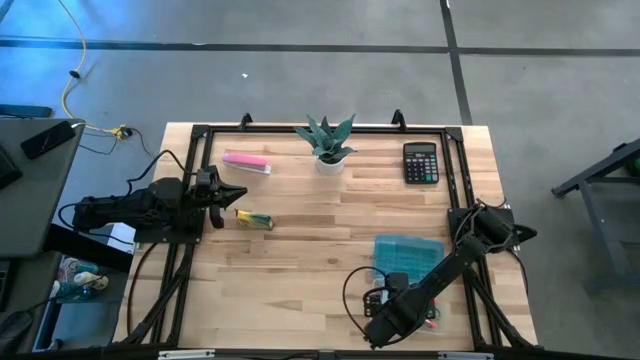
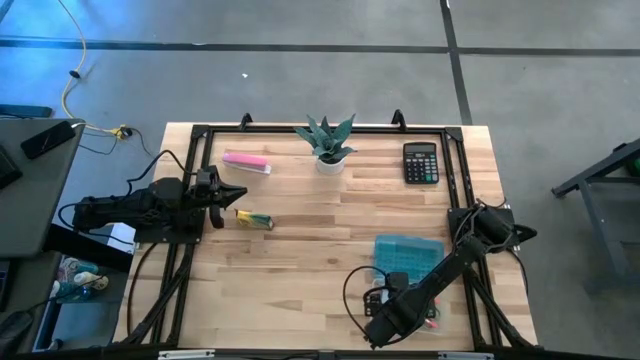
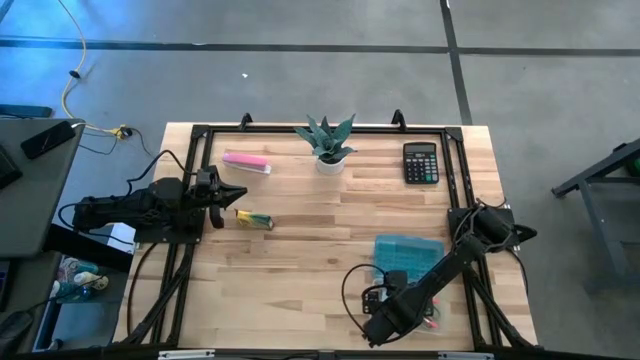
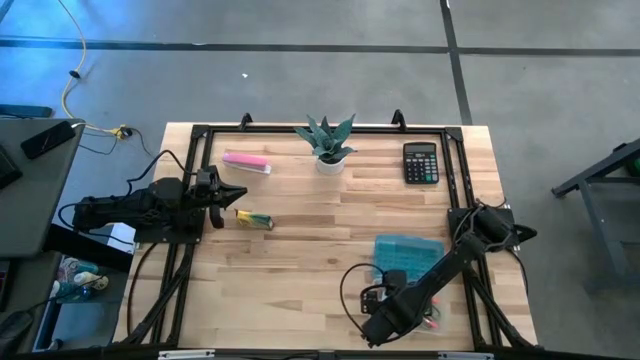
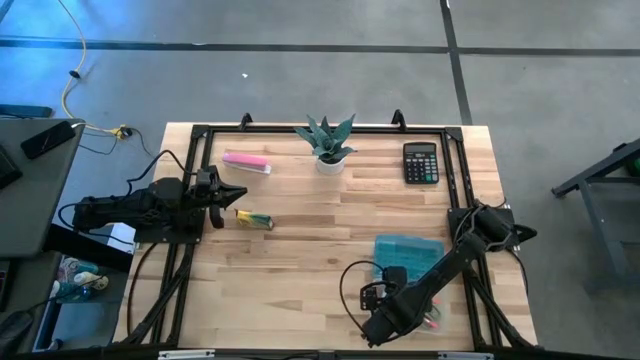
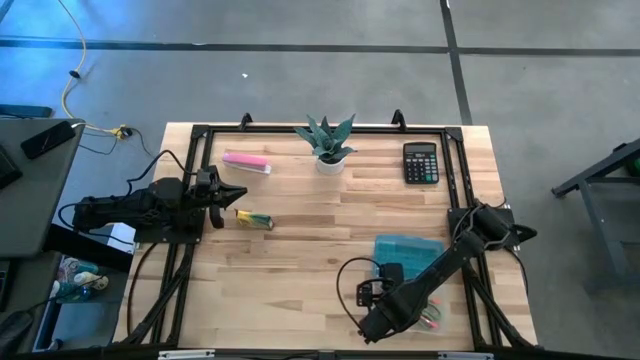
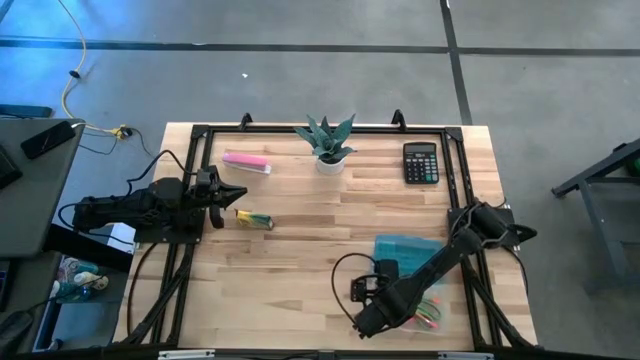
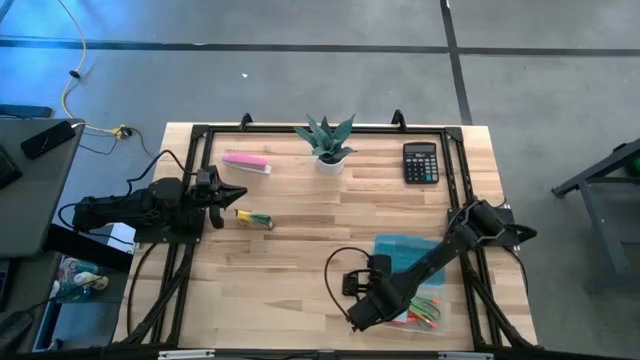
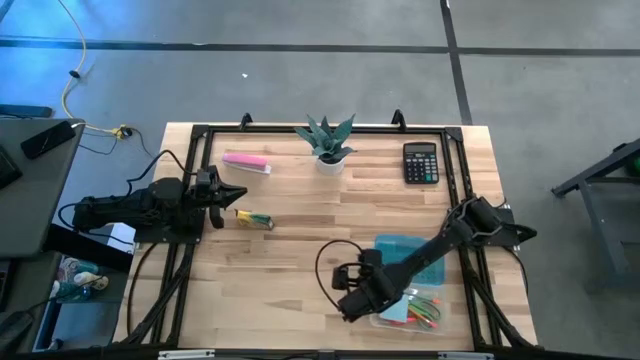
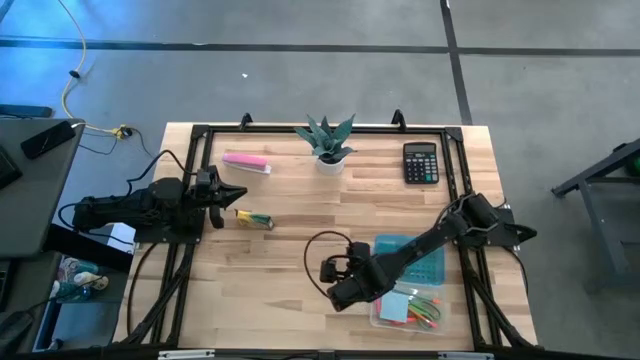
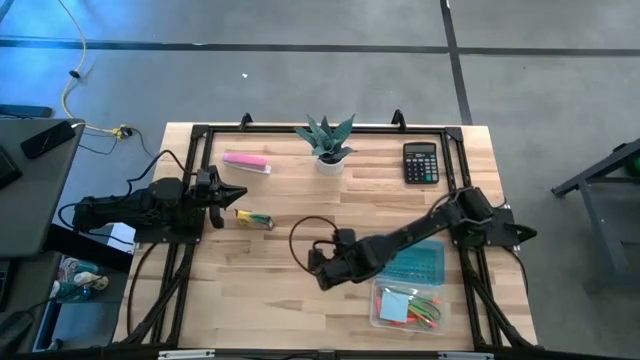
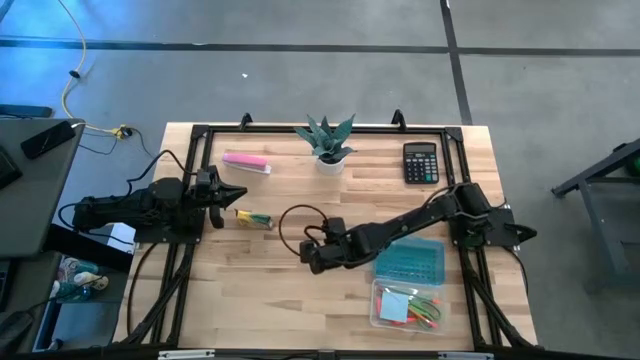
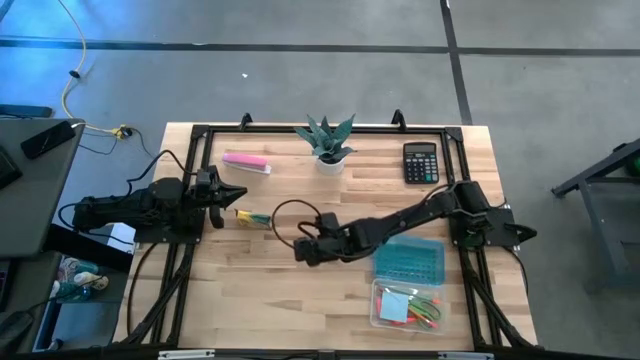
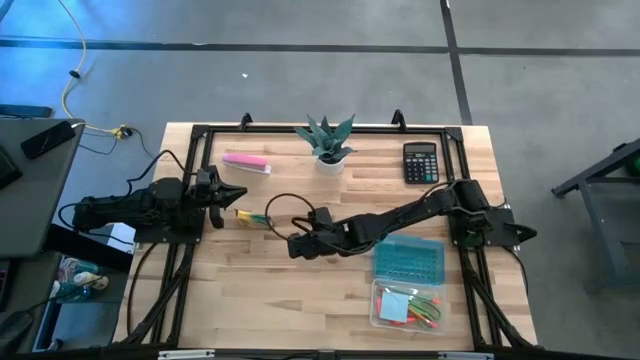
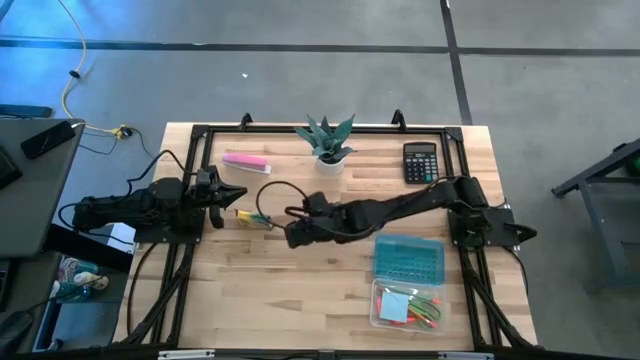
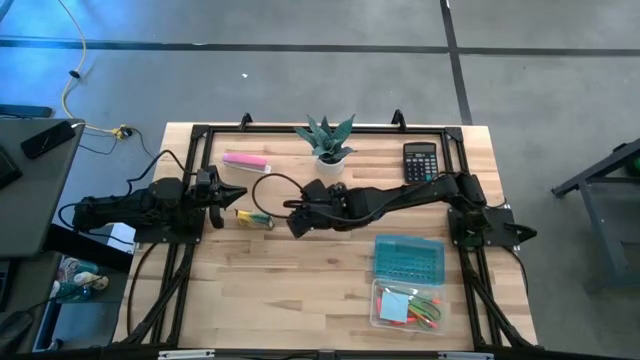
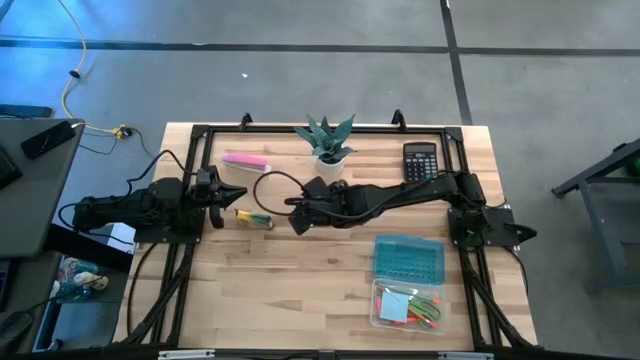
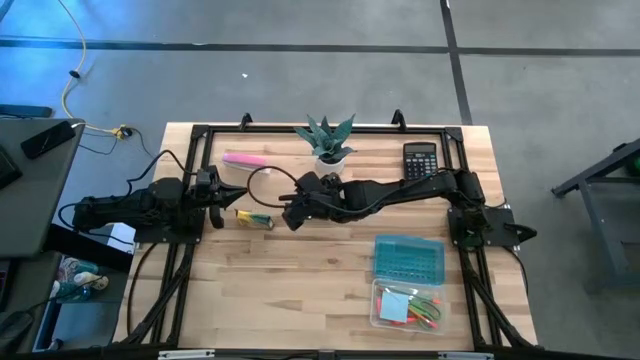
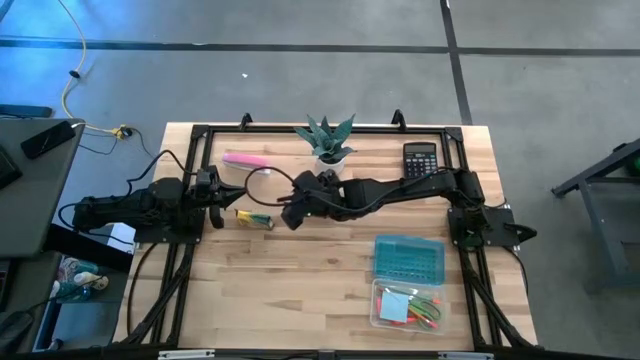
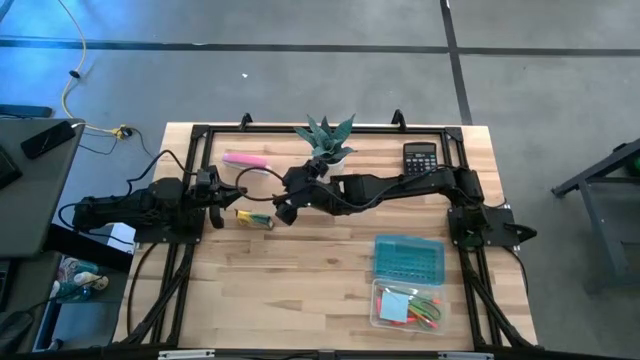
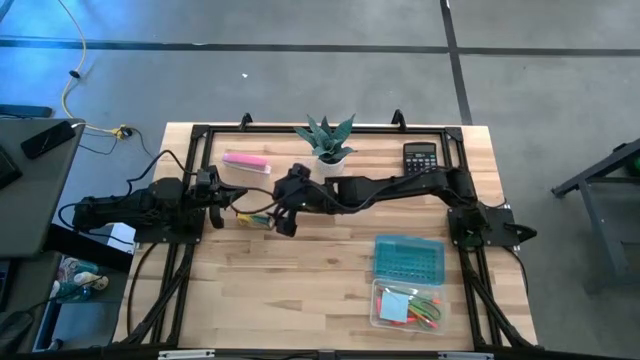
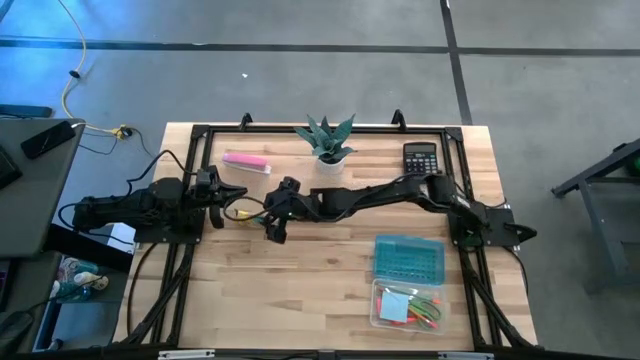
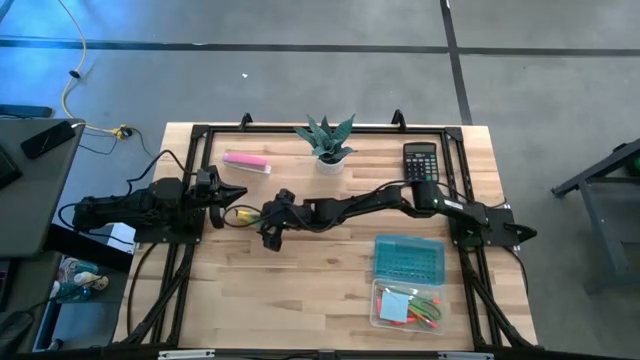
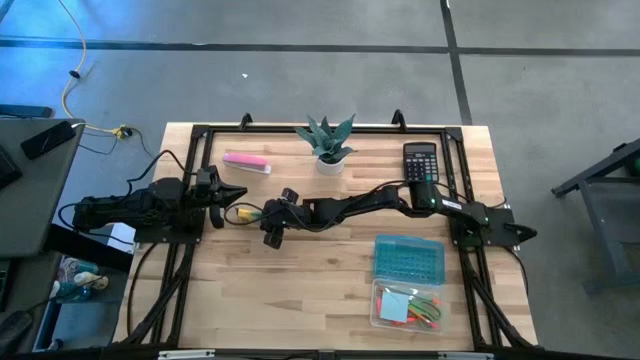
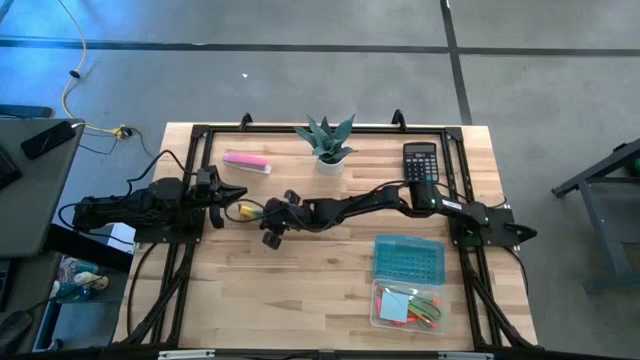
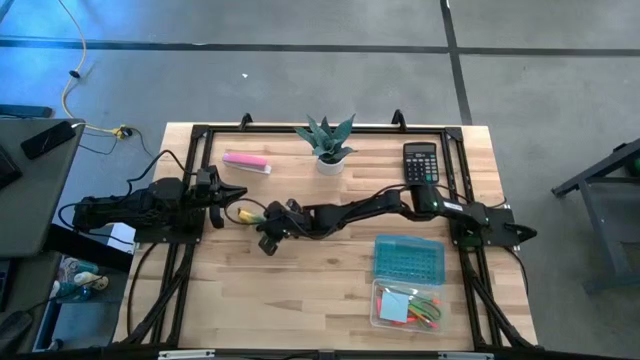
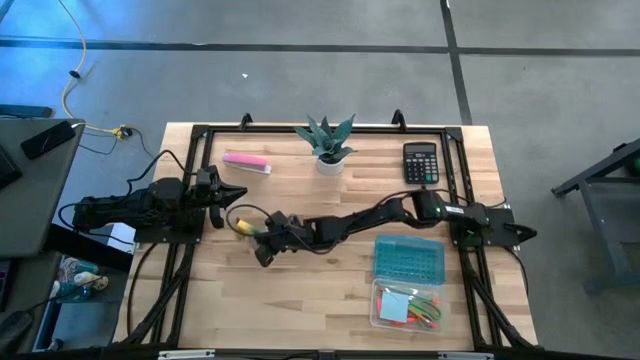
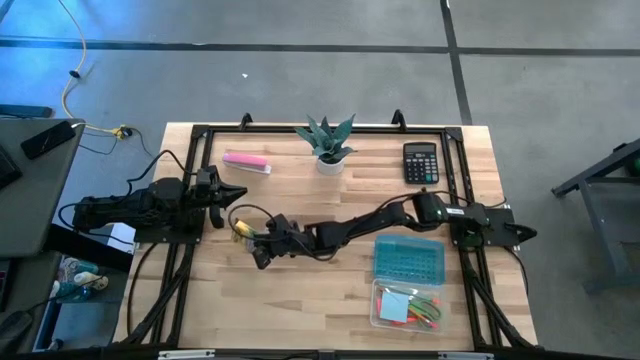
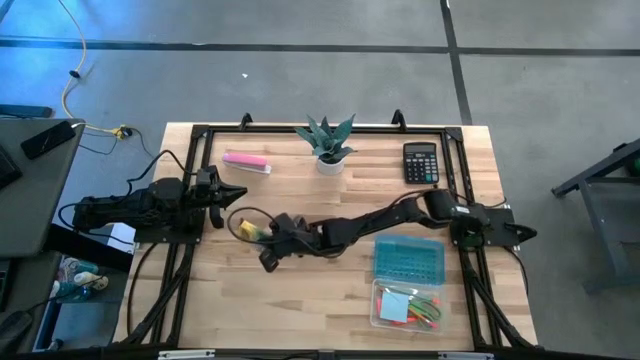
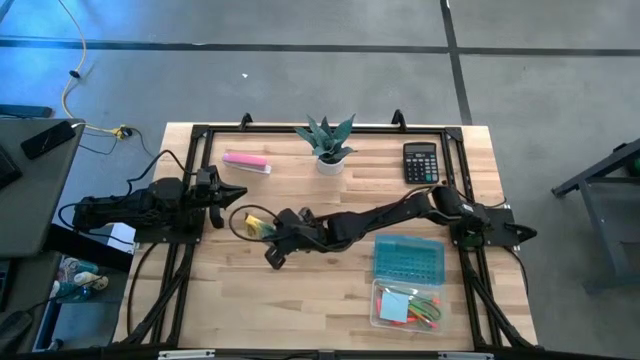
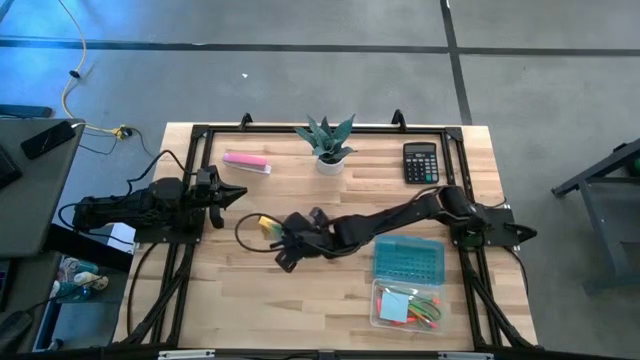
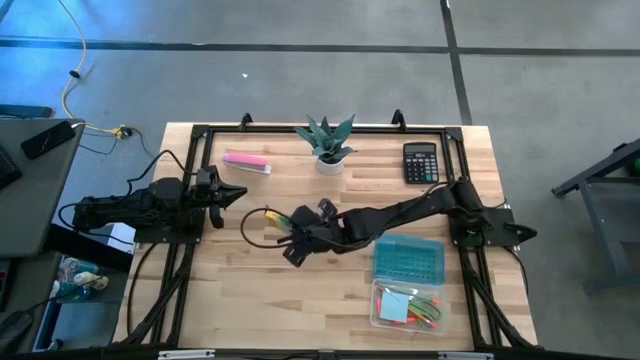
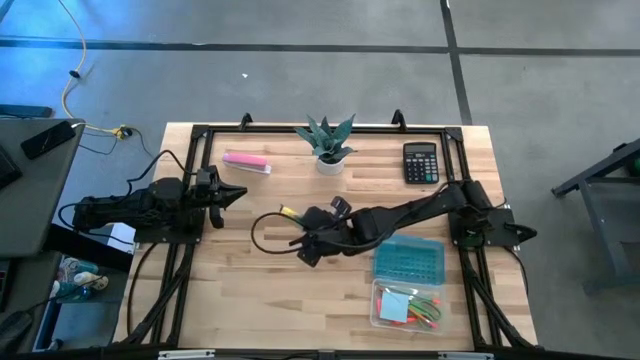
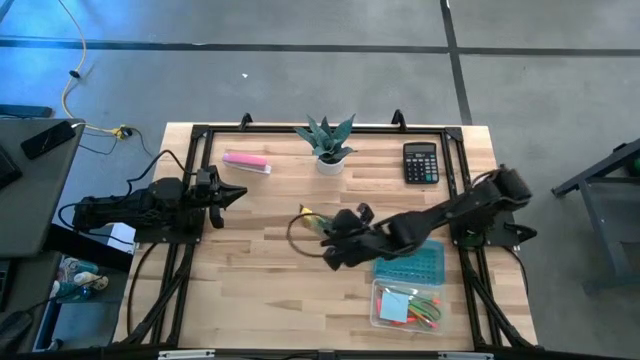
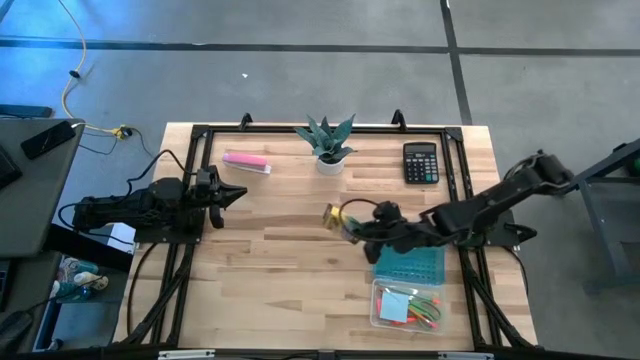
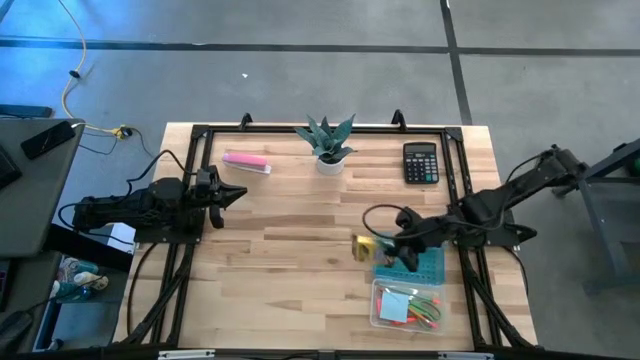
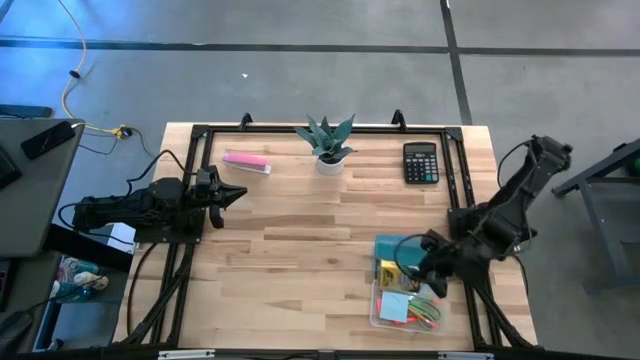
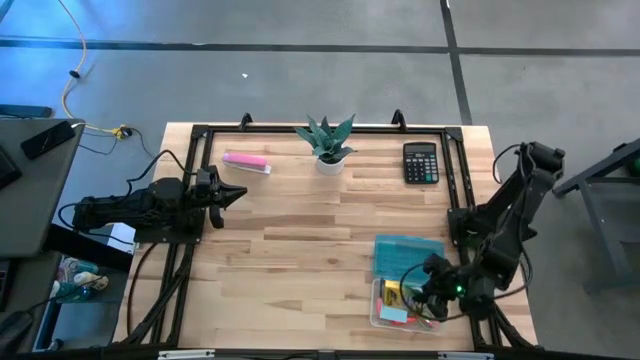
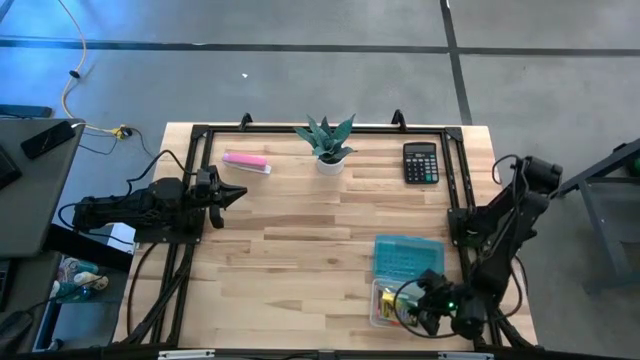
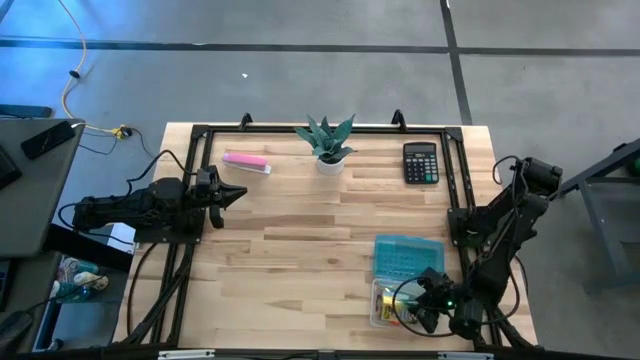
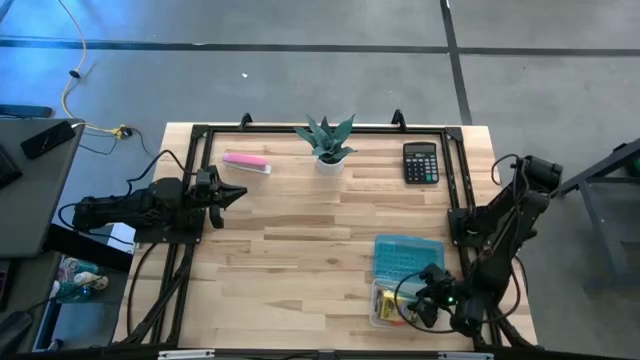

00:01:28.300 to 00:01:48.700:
Task: Pack school essentials
Put the yellow crayon box into the blue supply box

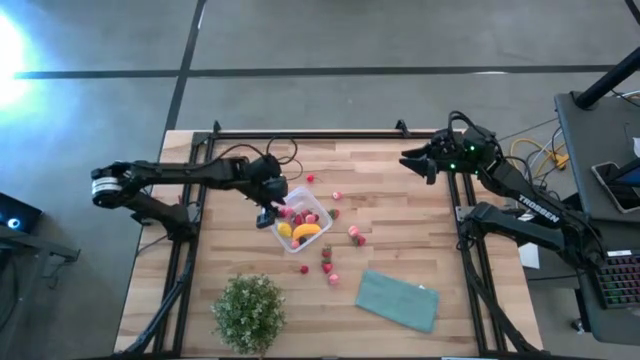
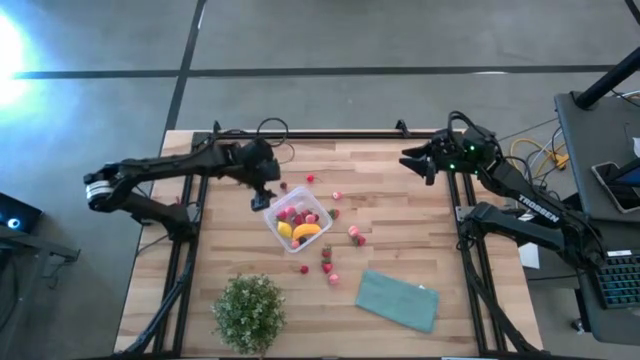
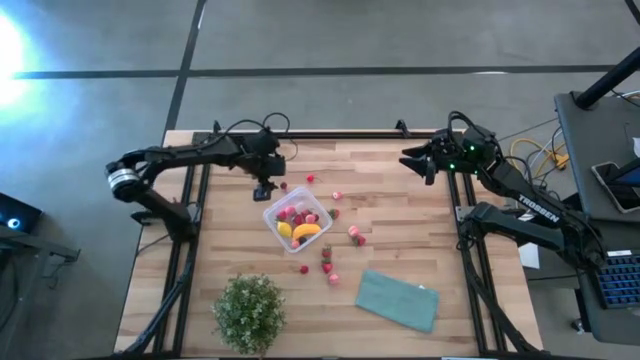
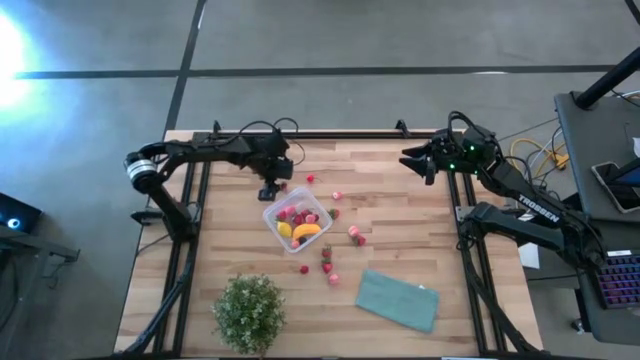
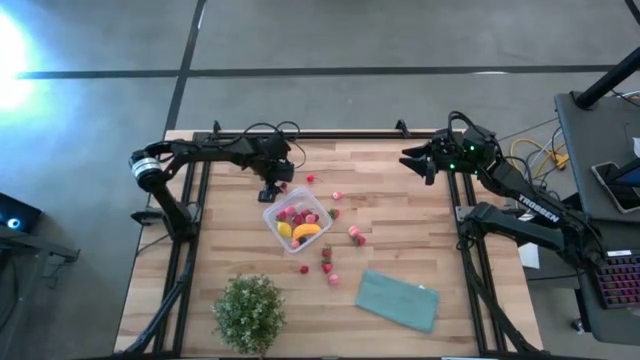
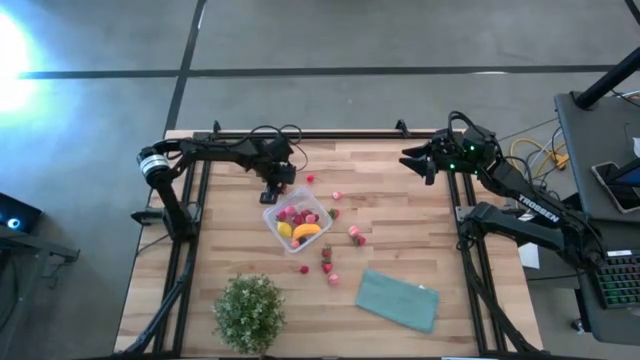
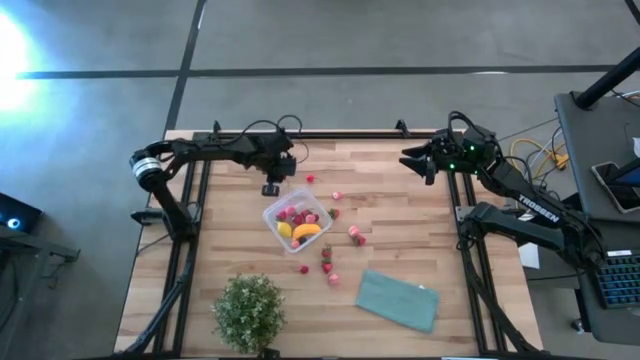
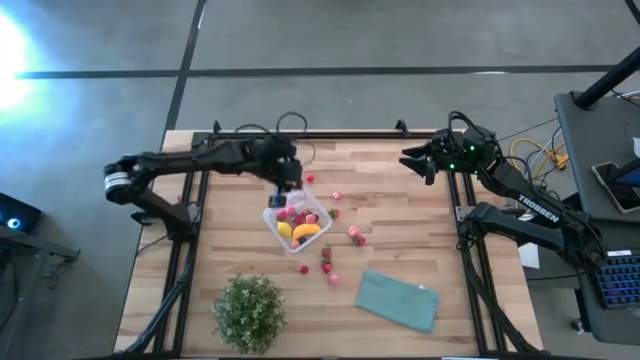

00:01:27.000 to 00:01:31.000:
Task: Pick and placing Produce into tupperware
Put the dark red cherry into the transparent bin
